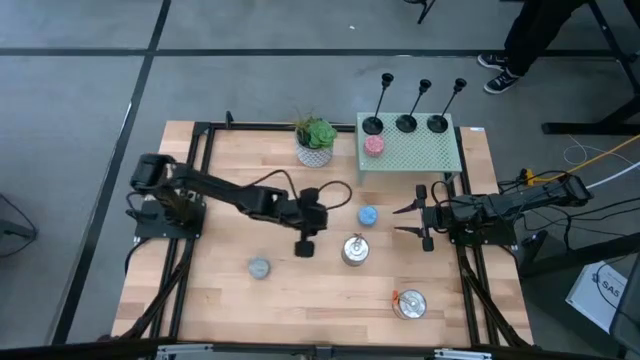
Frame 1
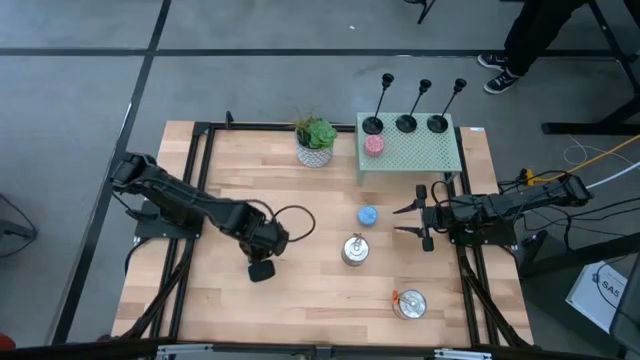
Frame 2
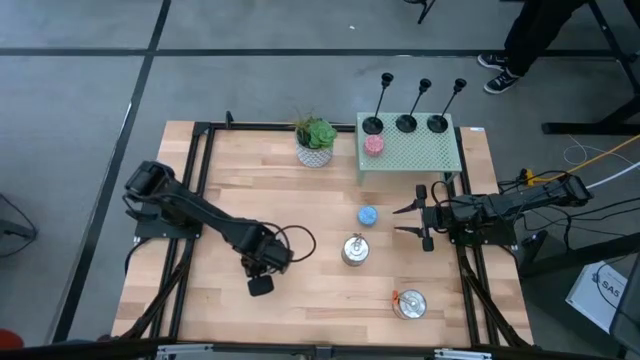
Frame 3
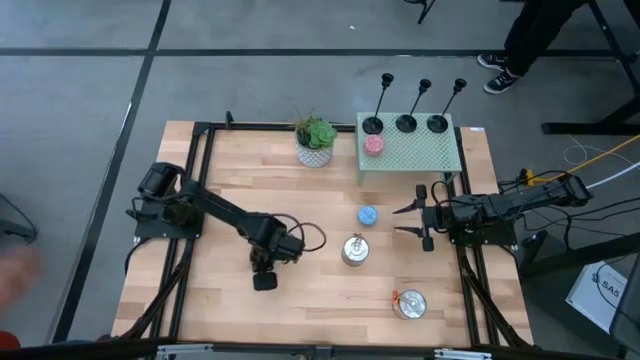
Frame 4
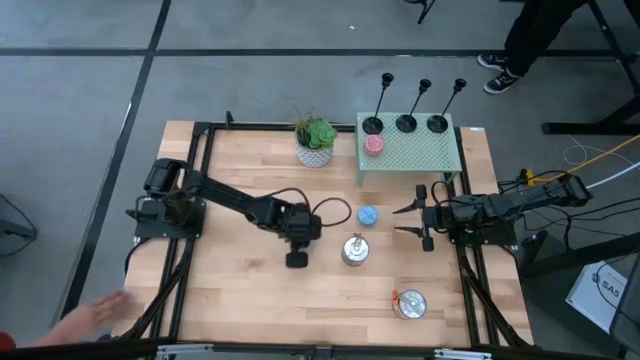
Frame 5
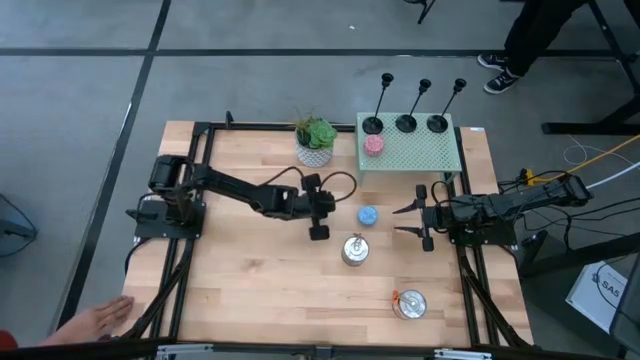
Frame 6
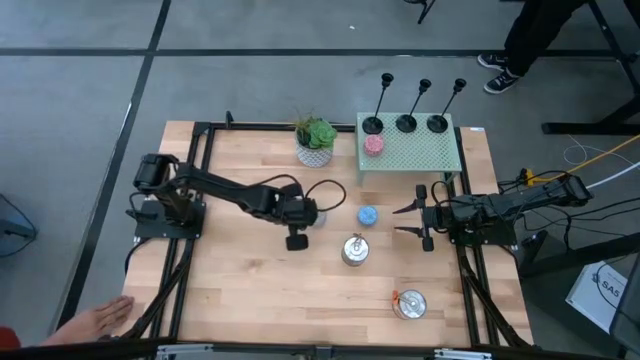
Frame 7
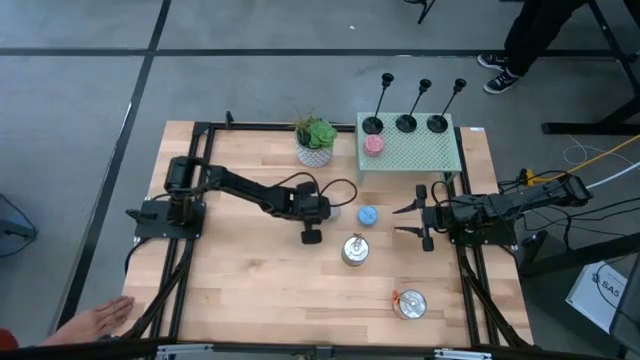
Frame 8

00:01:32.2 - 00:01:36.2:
Task: Pick & Place candle stick holders
Move the blue yellow scented candle to the middle of the table

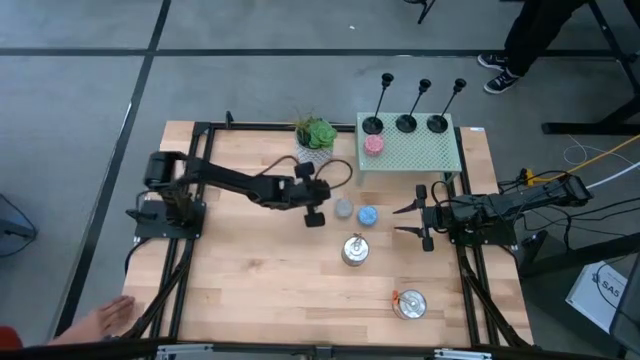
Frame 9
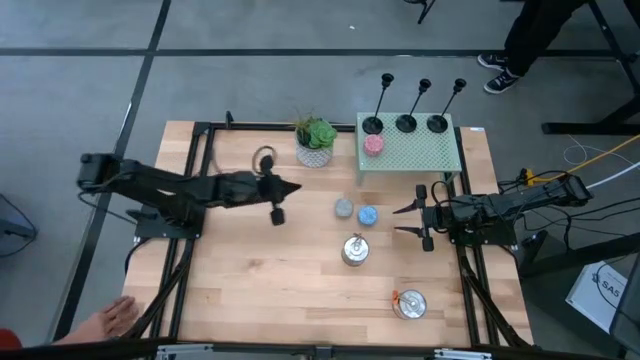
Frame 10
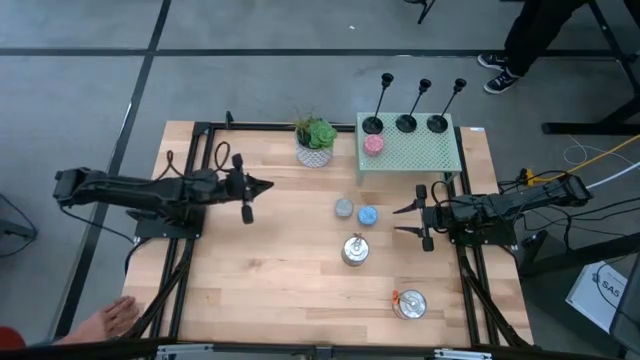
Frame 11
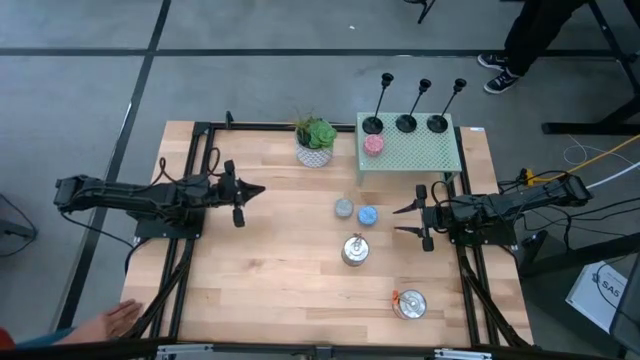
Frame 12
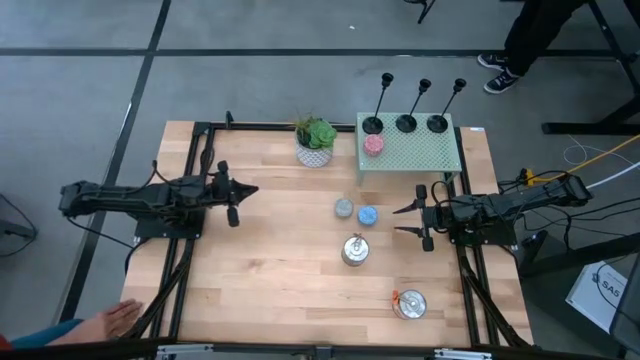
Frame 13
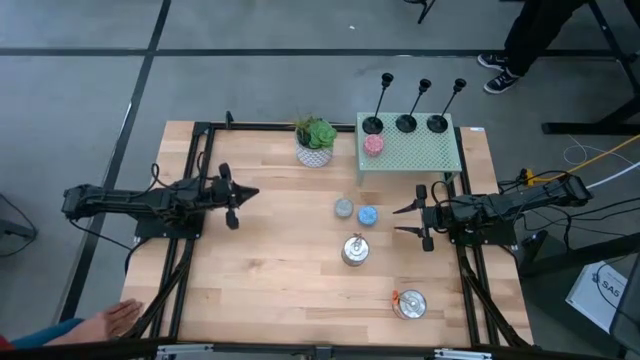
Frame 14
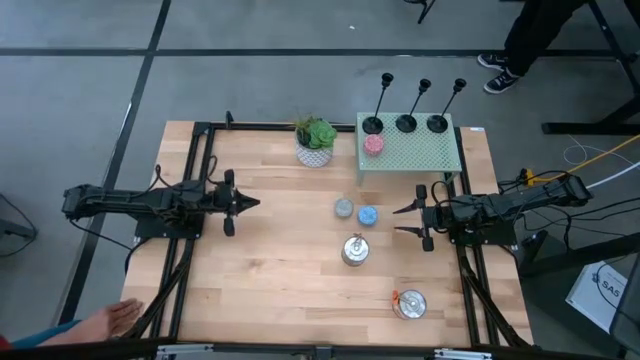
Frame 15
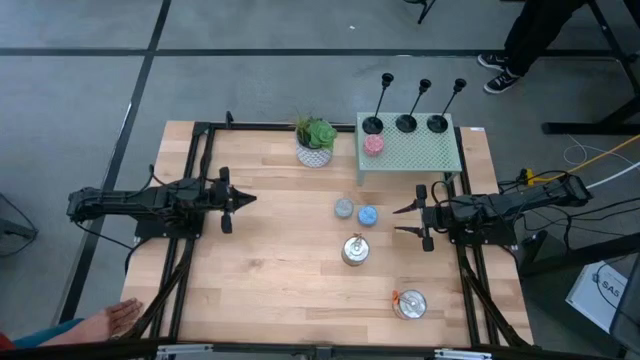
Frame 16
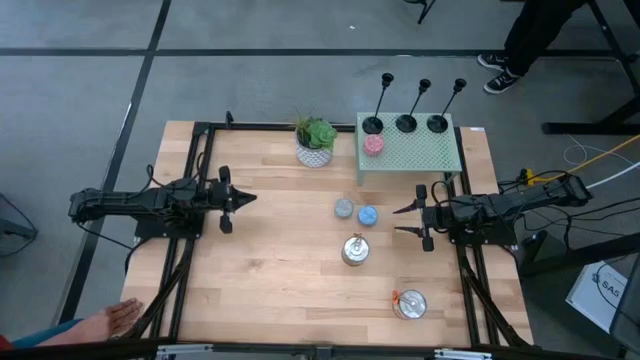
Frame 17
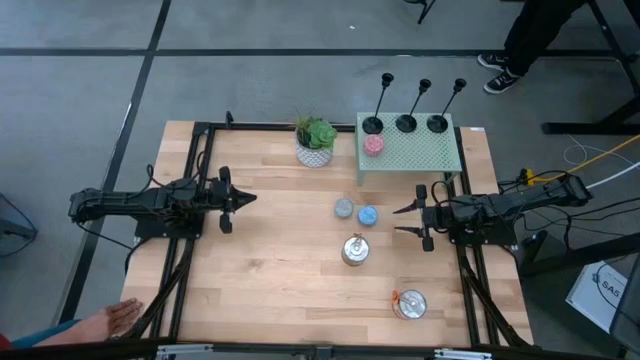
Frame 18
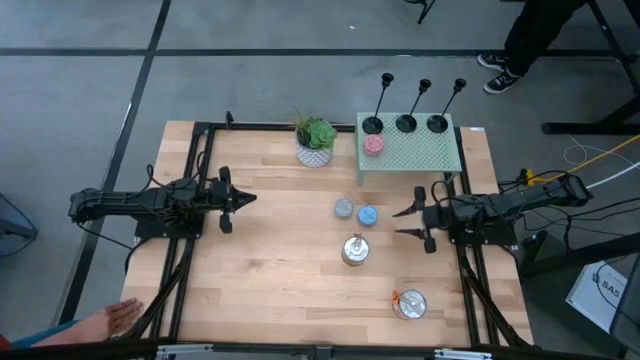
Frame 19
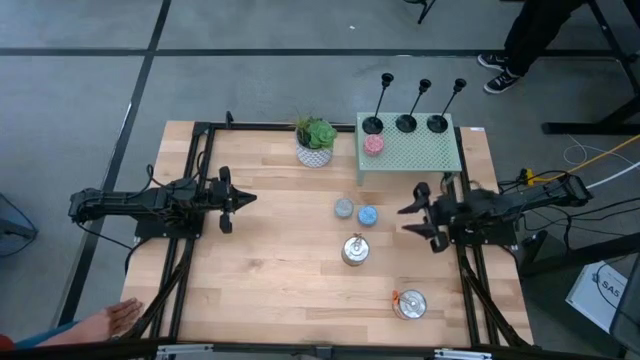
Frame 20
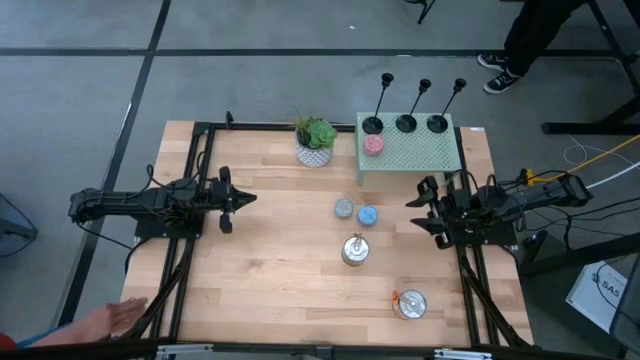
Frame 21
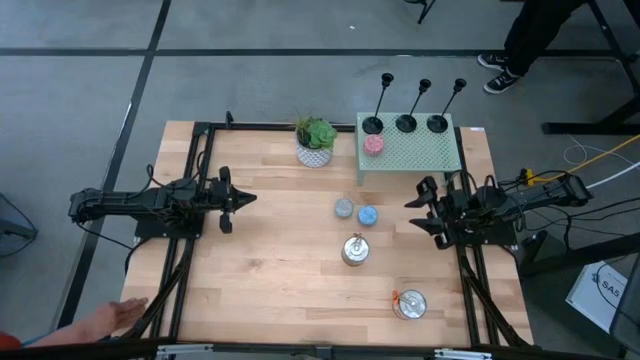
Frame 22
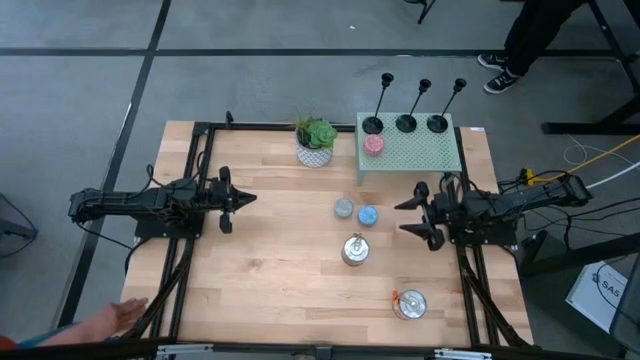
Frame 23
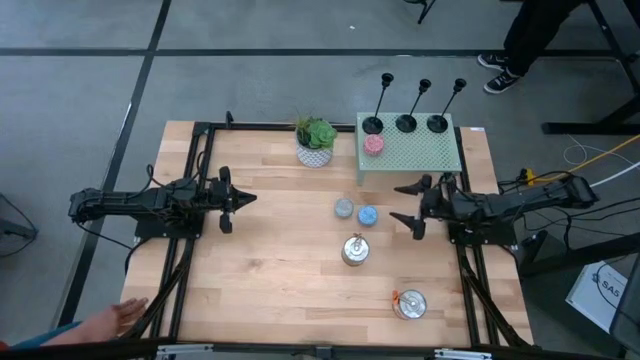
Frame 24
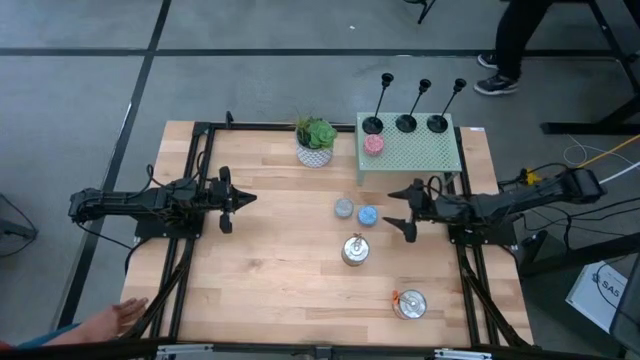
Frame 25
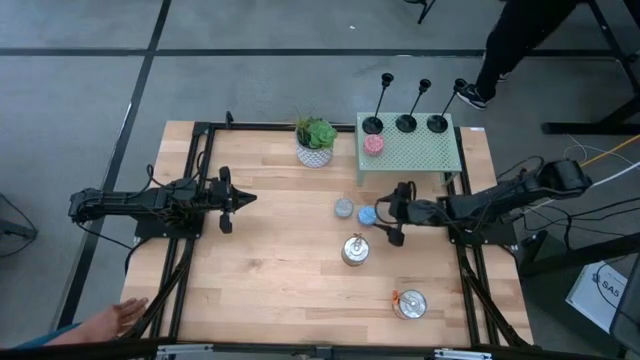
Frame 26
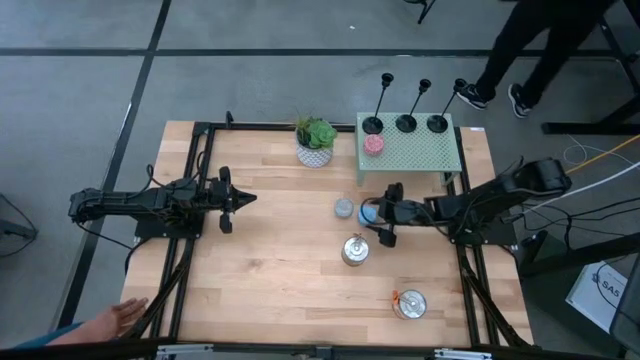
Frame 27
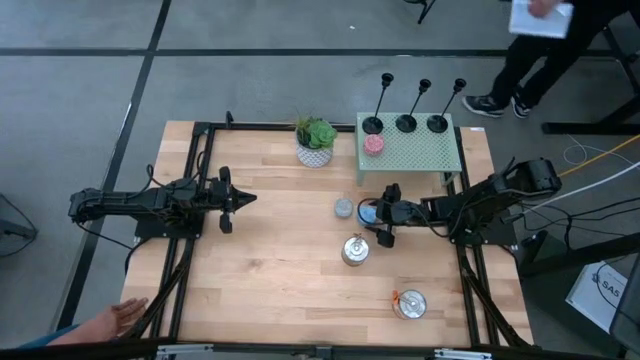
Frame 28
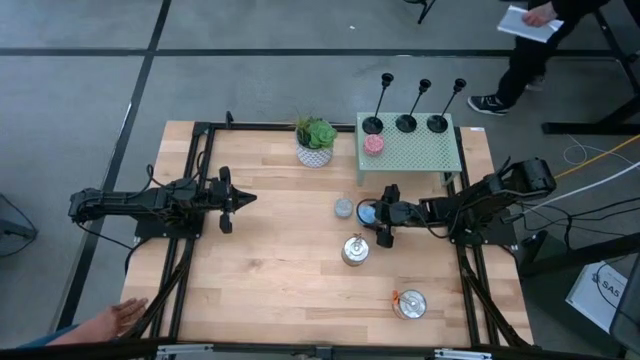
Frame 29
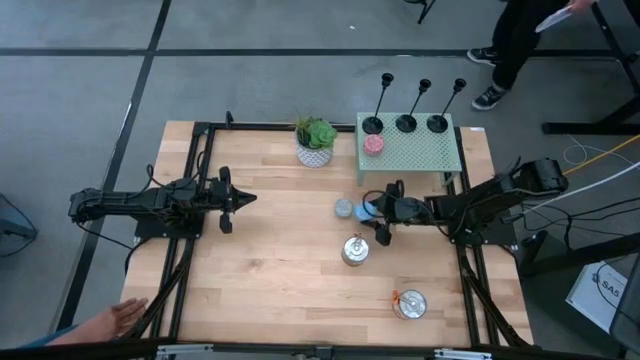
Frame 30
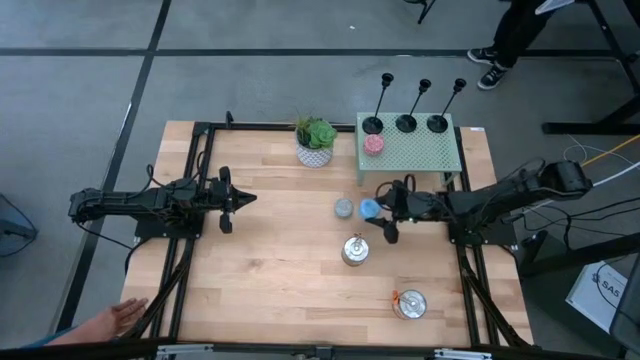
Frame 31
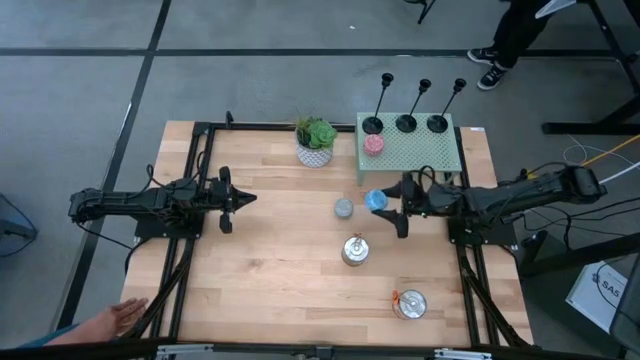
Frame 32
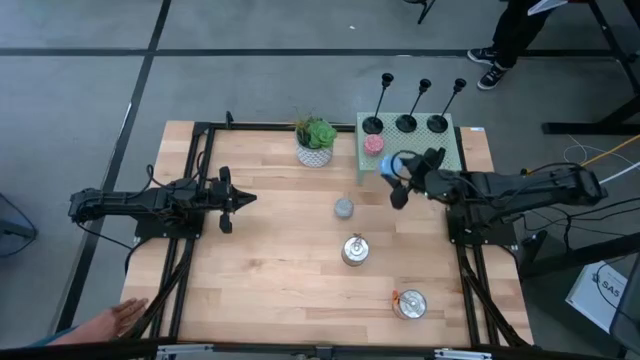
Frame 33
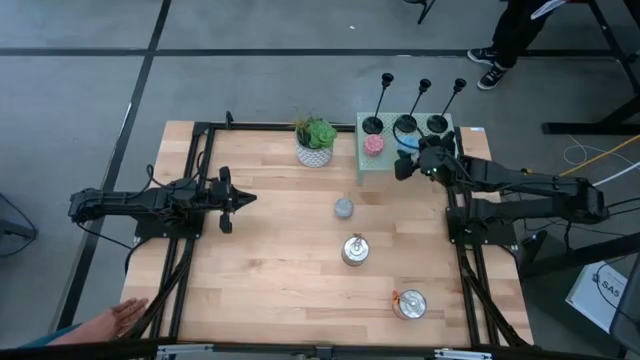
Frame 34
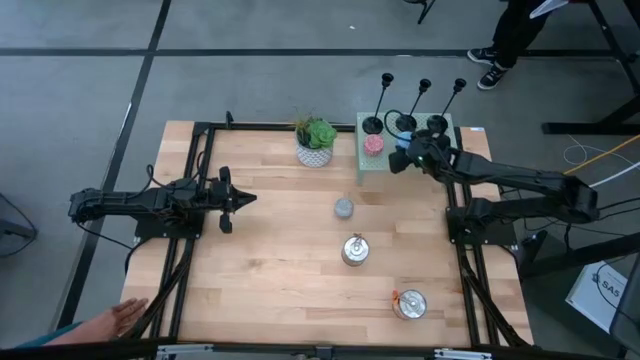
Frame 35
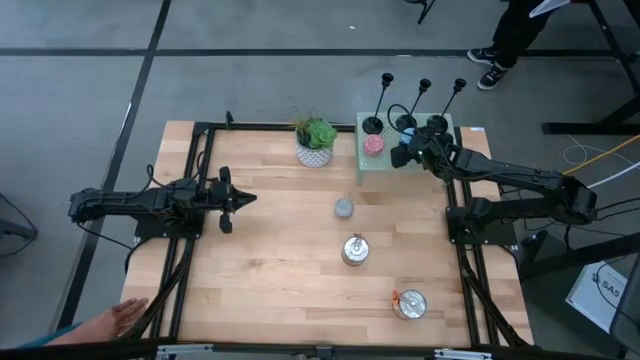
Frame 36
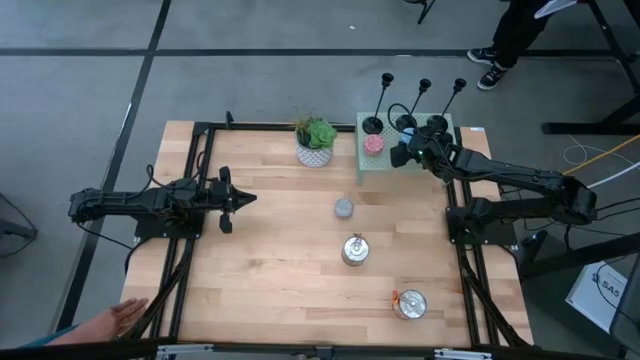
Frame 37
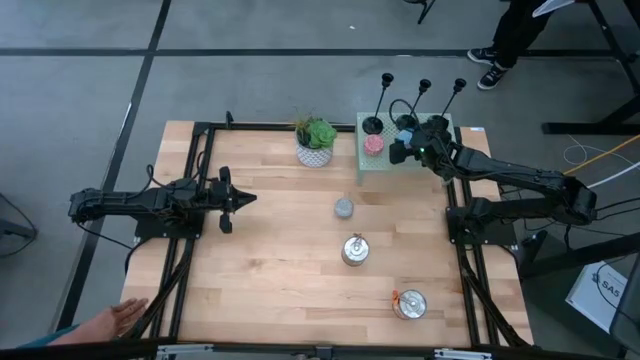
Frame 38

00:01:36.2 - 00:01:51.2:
Put the blue white scented candle and aligned with other red scented candle on the shelf

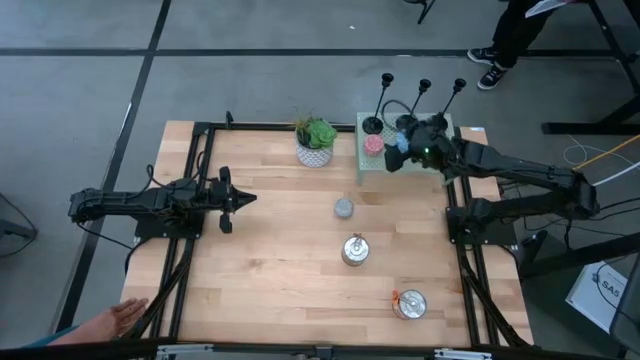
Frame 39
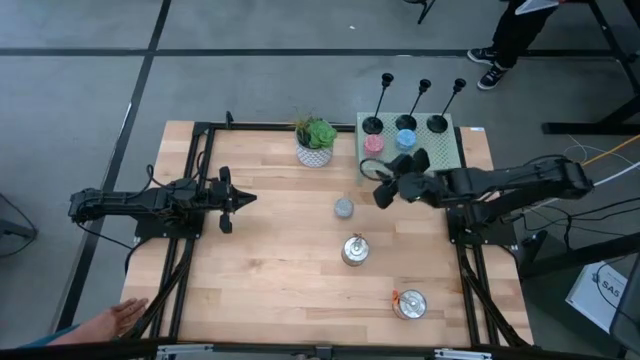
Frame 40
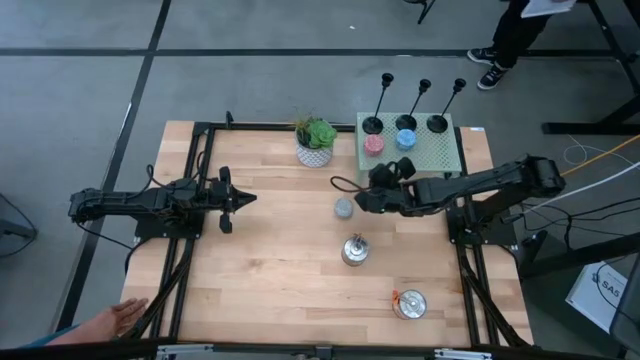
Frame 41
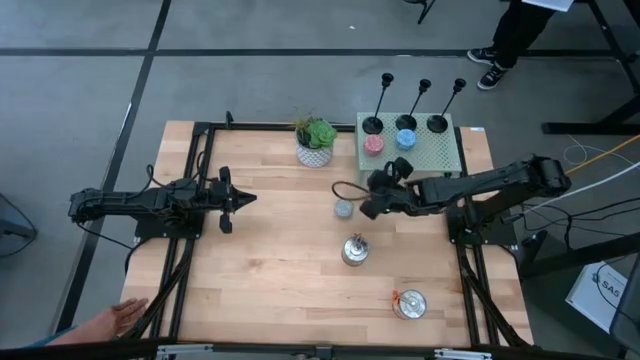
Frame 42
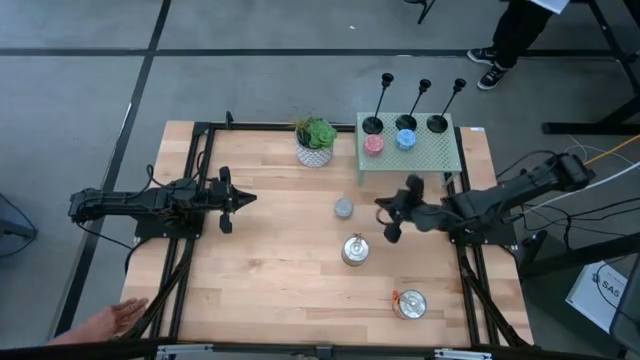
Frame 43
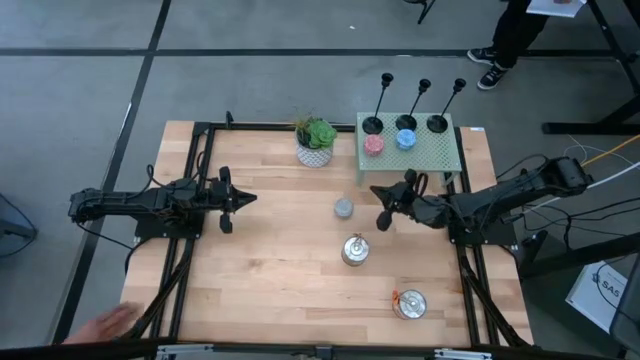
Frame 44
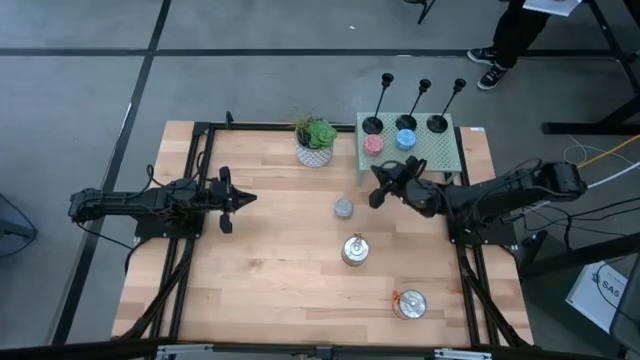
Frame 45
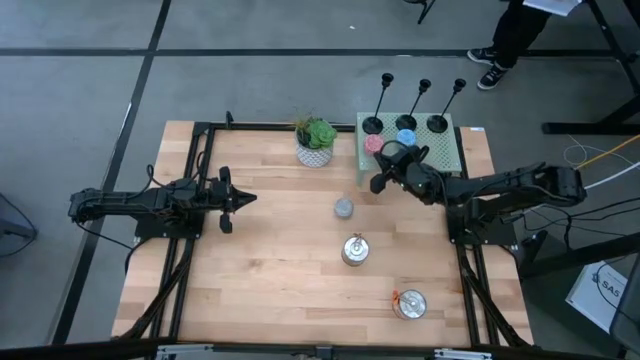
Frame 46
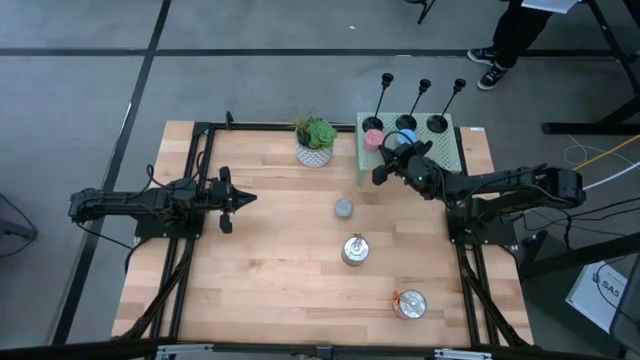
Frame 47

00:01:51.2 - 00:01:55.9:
Adjust the red yellow scented candle on the shelf
